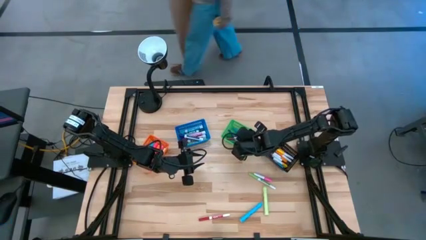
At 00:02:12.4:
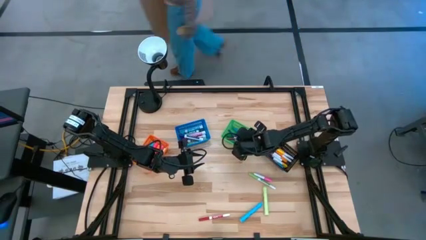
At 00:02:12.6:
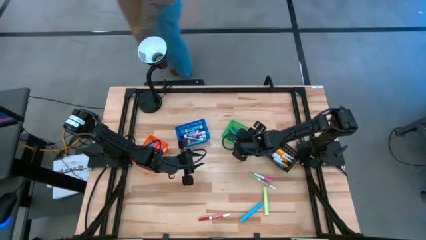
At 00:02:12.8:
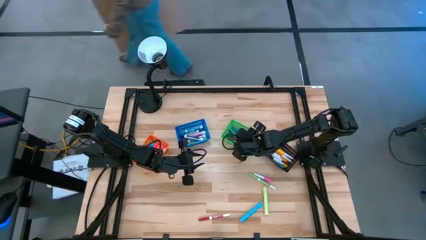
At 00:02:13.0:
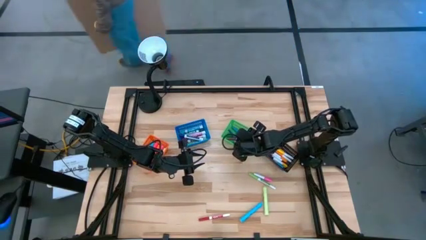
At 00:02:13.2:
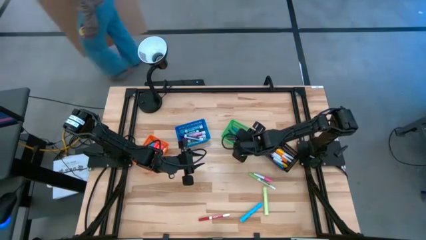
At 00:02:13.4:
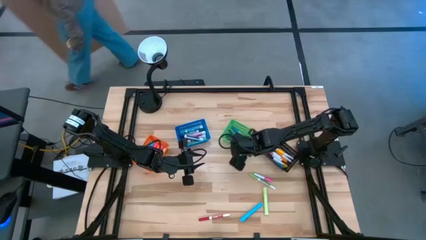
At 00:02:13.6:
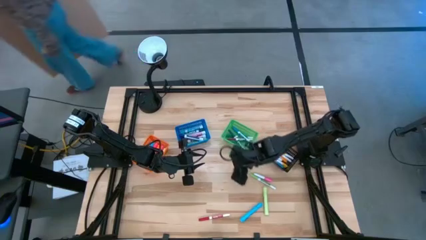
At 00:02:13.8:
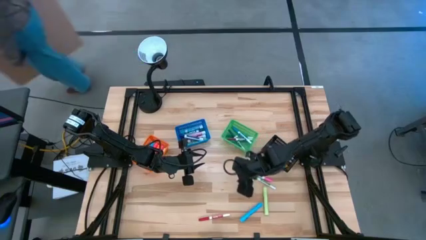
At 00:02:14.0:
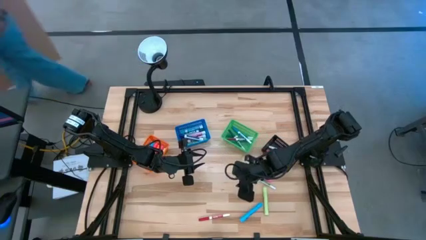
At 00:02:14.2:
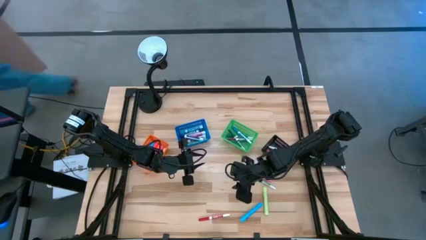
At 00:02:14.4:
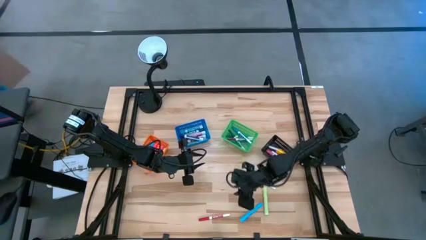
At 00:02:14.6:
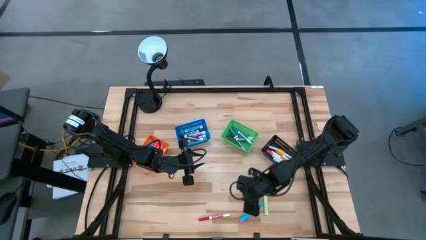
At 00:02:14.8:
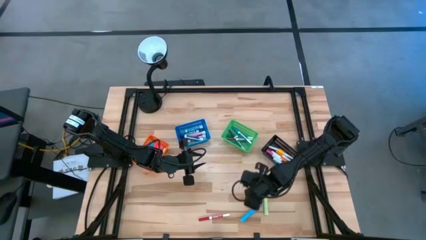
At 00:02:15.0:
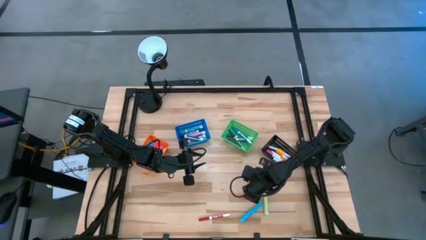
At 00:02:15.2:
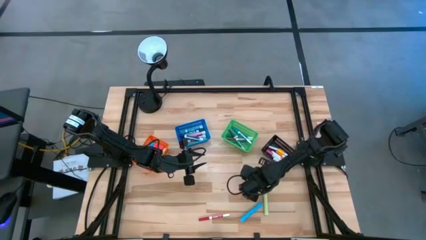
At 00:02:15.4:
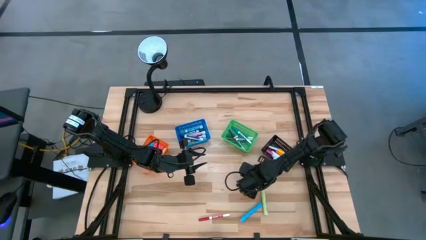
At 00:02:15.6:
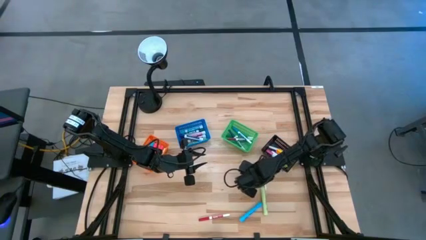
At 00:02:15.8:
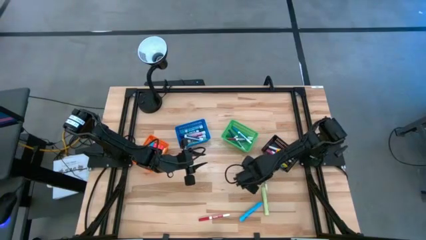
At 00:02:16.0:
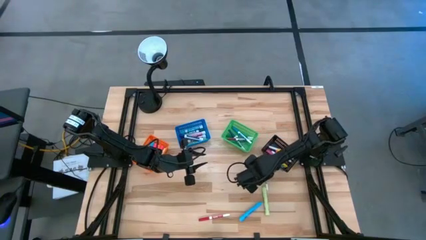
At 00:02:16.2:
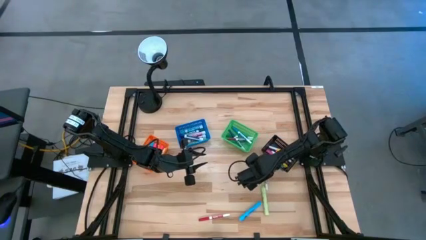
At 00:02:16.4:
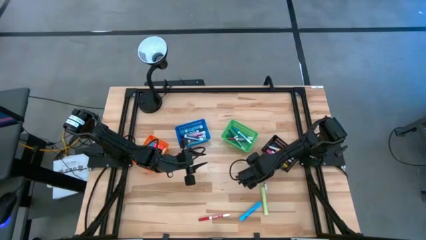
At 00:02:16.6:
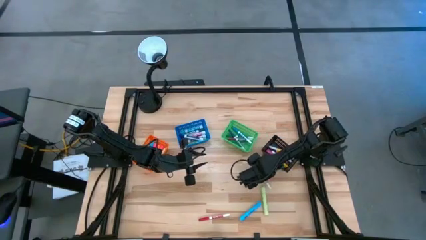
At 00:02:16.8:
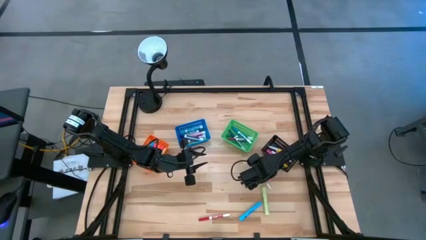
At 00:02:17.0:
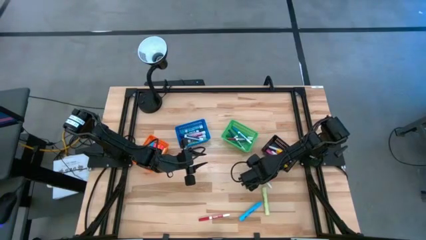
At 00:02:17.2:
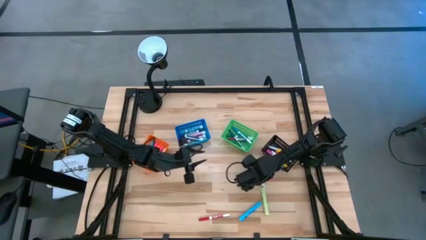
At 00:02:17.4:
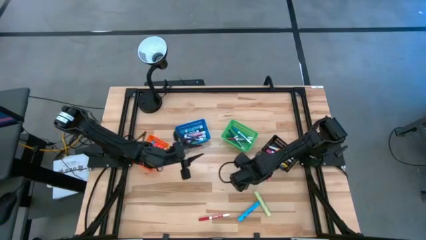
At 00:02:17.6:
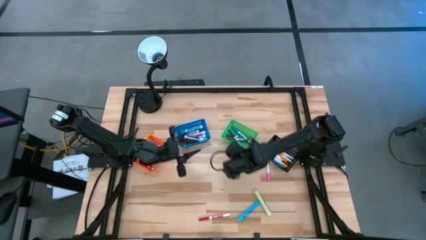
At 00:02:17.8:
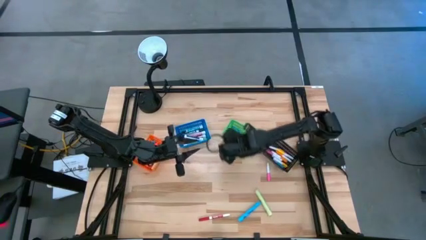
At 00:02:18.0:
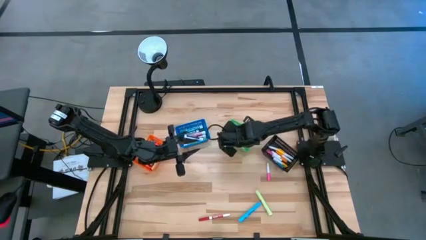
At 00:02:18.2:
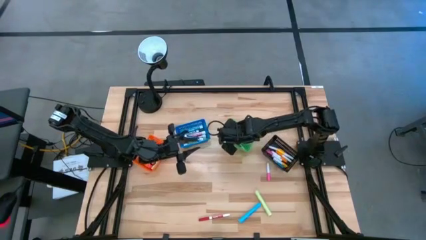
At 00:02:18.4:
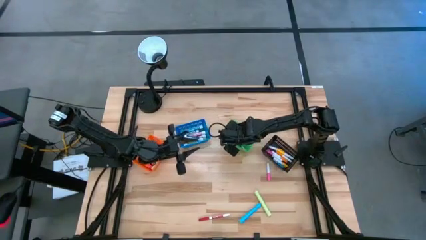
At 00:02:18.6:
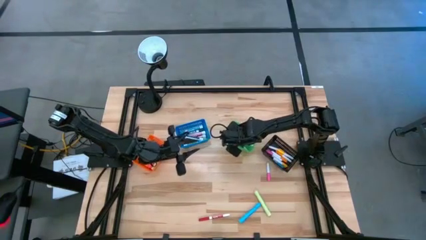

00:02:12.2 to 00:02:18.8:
Task: Pick & Place Markers
Put the large light green marker pen into the green basket

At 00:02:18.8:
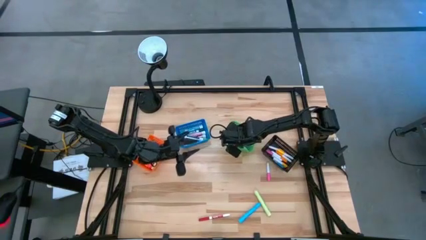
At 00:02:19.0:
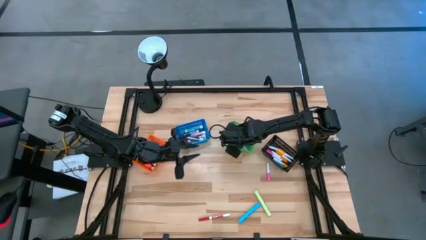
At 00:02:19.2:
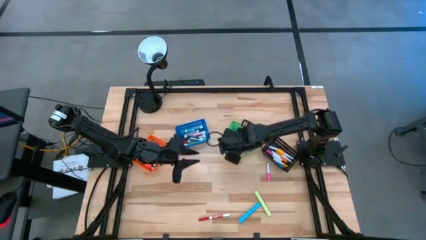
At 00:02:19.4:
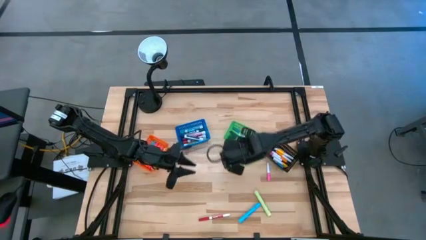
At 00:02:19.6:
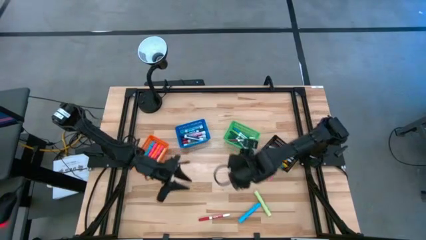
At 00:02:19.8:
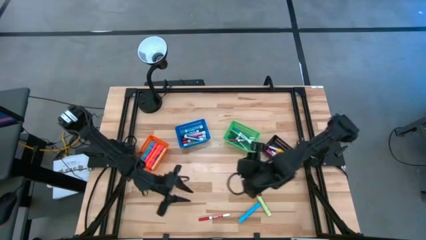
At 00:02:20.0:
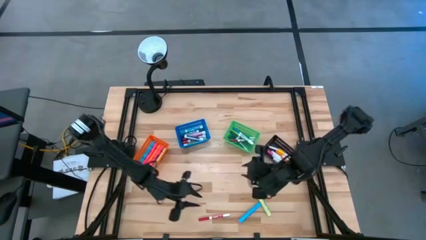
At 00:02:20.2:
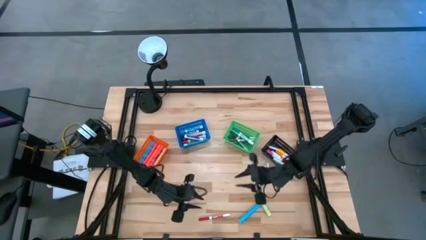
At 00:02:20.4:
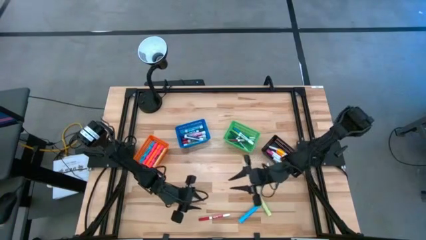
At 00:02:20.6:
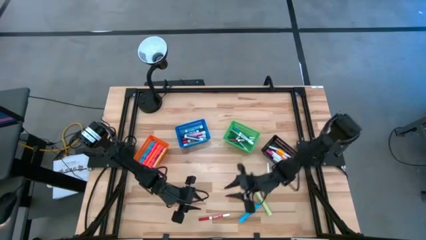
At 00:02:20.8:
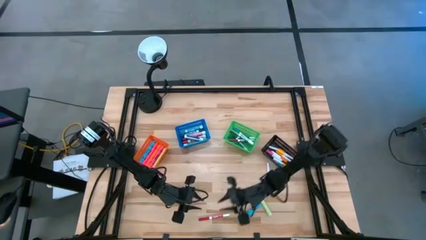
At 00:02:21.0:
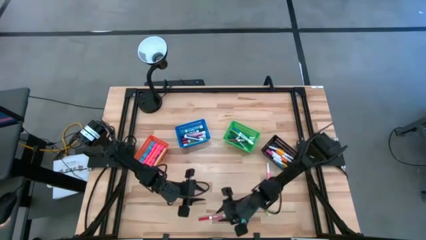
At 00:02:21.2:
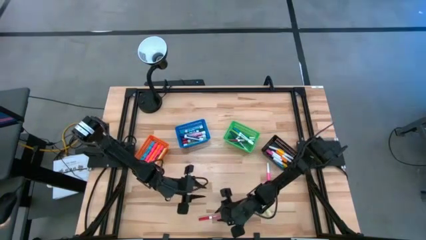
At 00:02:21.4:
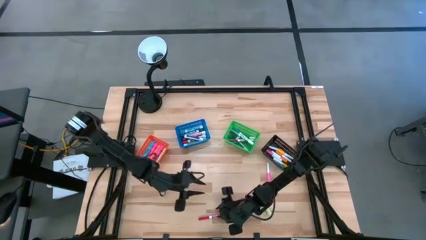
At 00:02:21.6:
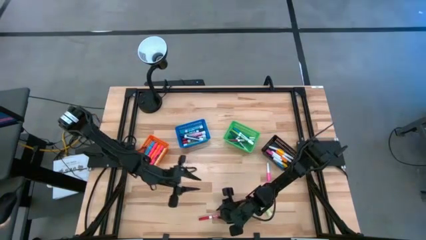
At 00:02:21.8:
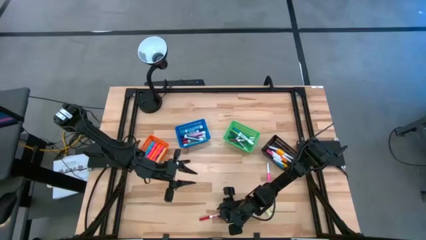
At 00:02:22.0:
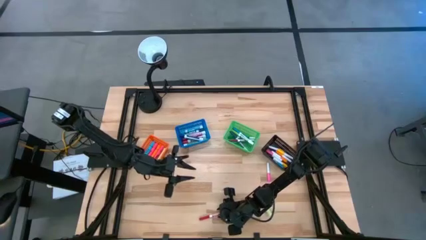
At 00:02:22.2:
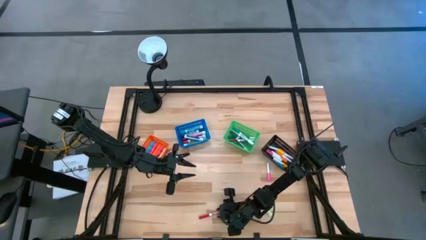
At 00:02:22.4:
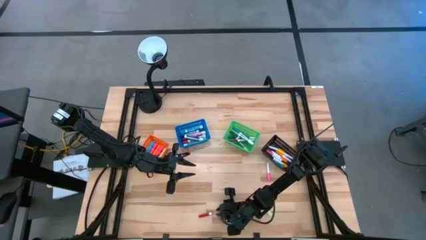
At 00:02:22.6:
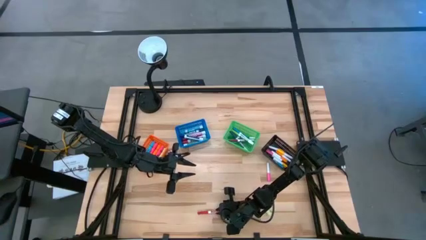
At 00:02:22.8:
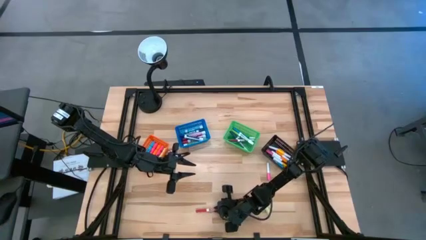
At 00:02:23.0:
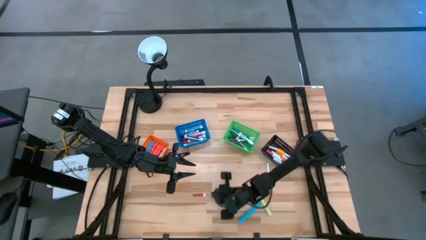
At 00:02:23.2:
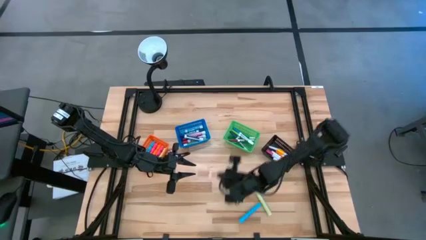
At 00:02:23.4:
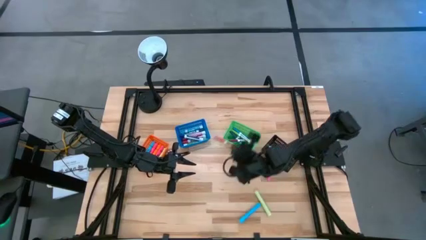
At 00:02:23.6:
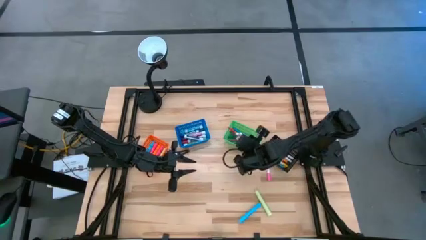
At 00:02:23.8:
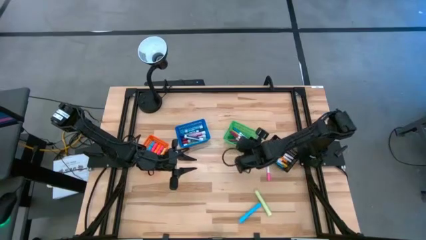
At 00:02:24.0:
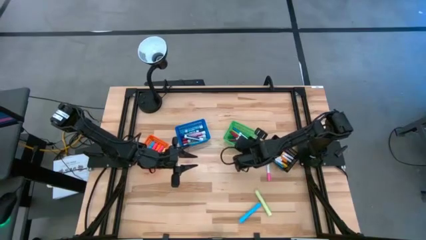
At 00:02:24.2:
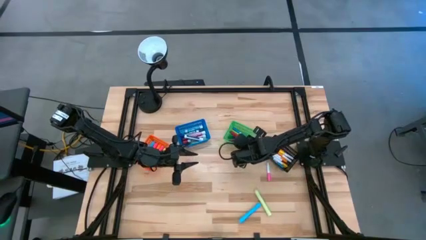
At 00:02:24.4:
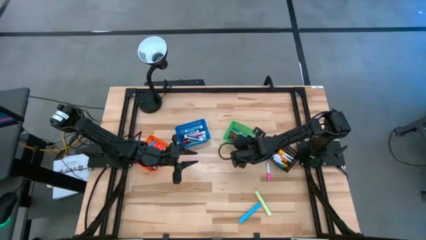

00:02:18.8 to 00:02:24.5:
Put the large red marker pen into the green basket

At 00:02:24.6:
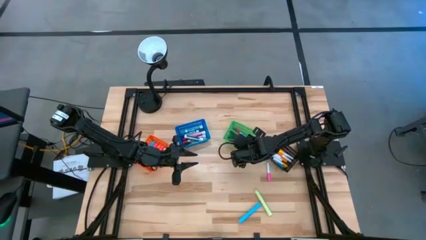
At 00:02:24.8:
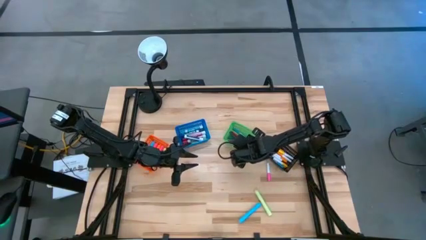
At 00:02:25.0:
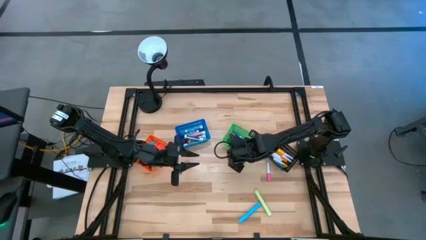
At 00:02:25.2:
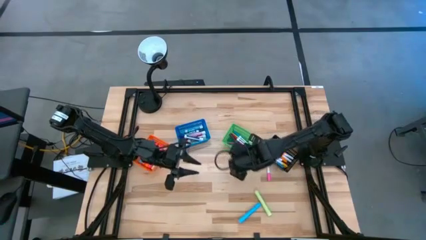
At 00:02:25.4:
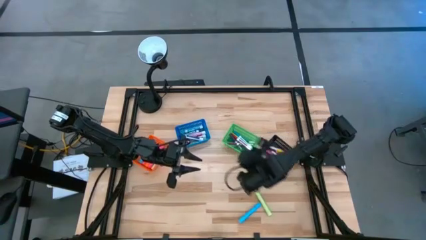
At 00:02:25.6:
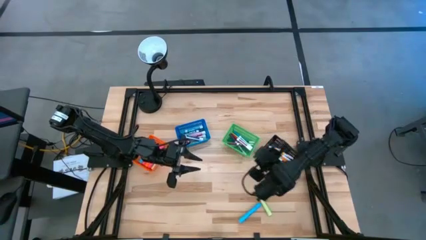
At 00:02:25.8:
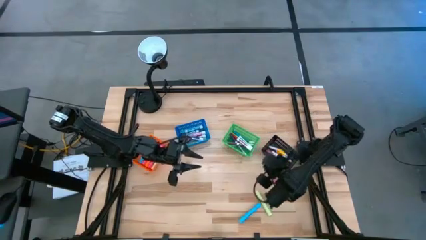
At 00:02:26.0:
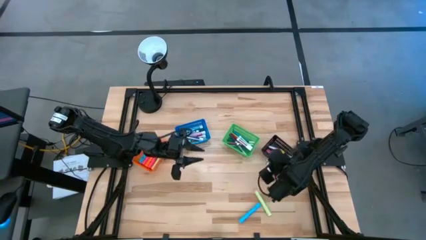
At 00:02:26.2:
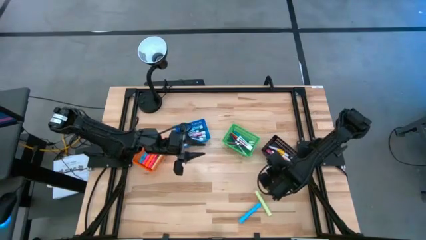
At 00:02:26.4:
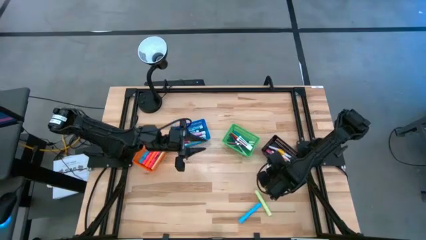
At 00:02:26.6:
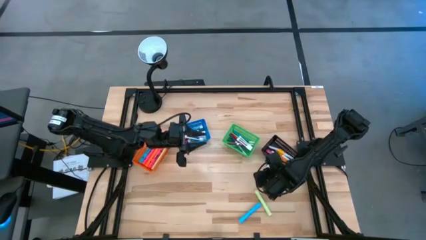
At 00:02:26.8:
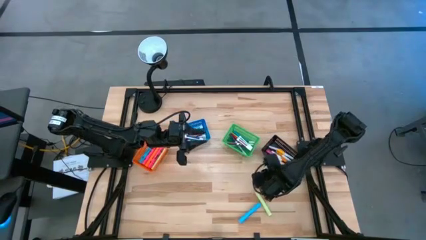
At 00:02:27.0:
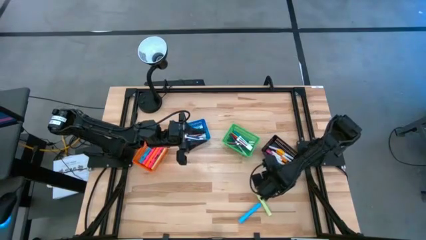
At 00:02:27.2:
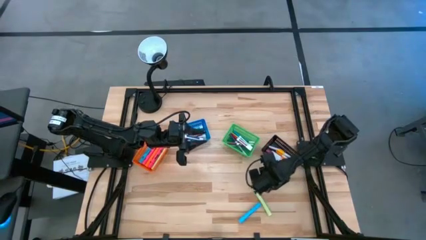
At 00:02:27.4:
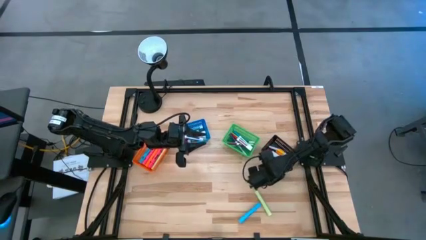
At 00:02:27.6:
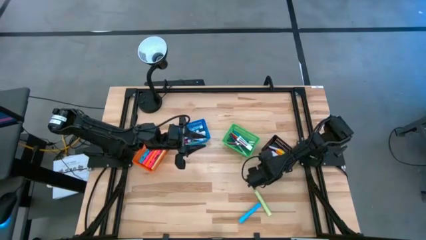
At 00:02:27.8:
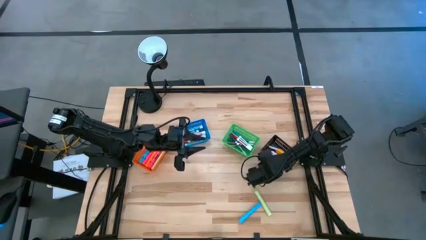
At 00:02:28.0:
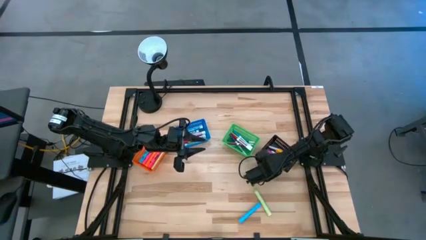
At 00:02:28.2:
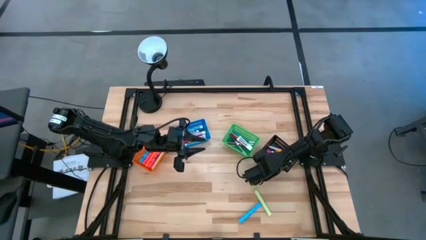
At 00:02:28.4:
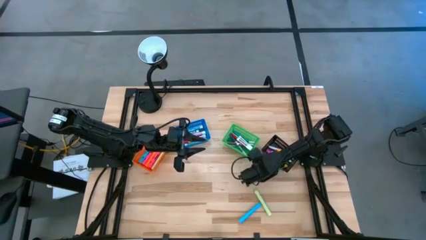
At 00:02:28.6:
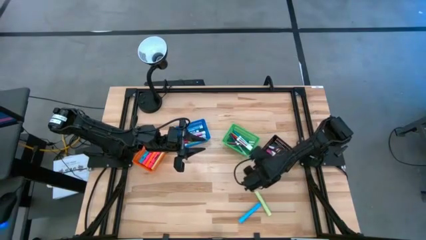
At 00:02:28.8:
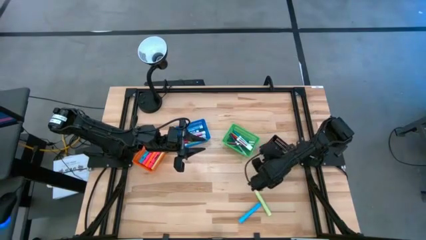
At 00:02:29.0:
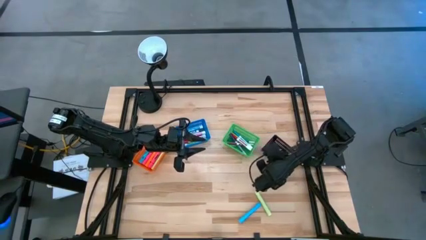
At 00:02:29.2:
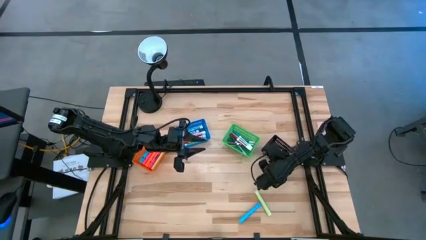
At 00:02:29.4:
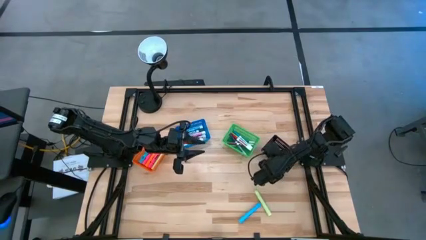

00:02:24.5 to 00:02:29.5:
Put the small pink highlighter pen into the black basket
